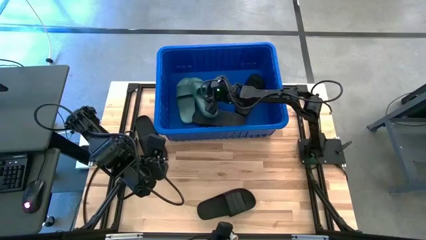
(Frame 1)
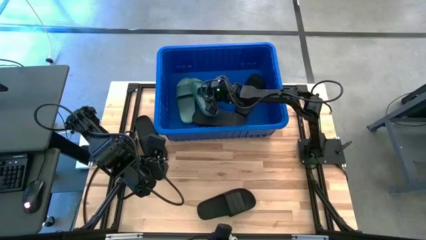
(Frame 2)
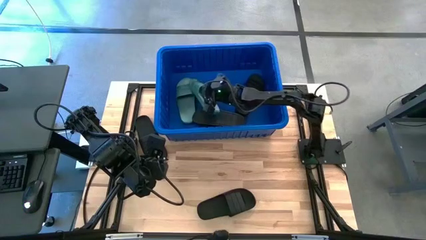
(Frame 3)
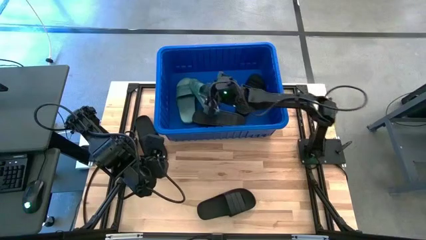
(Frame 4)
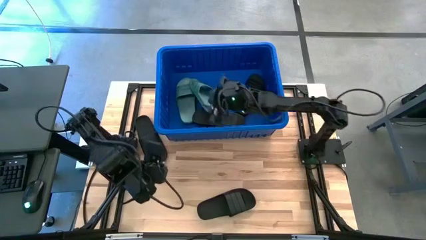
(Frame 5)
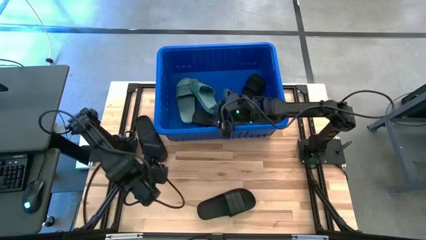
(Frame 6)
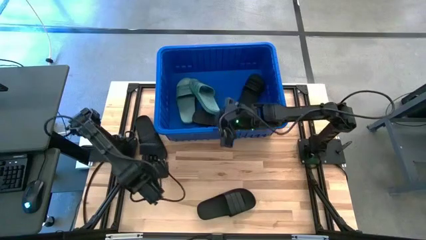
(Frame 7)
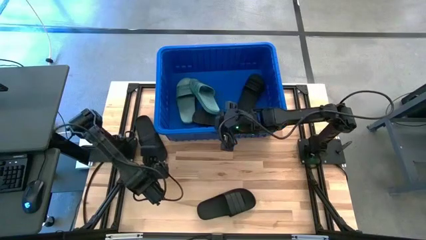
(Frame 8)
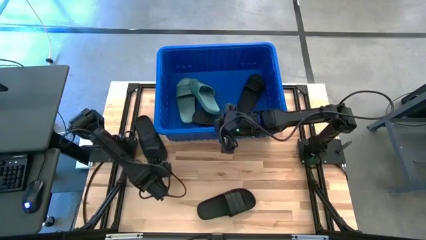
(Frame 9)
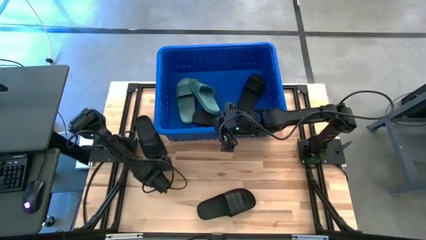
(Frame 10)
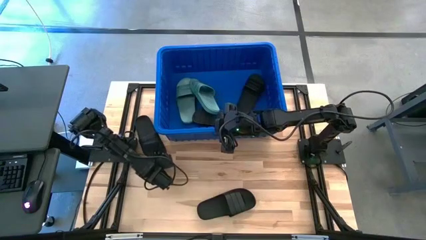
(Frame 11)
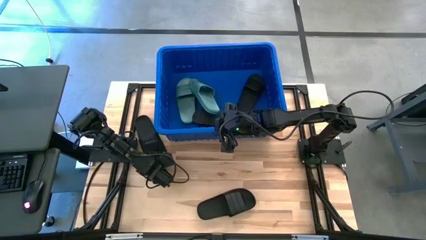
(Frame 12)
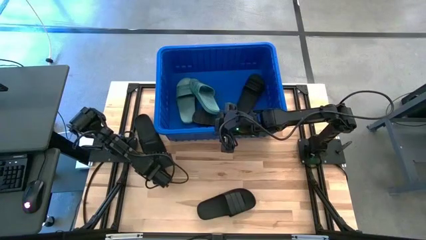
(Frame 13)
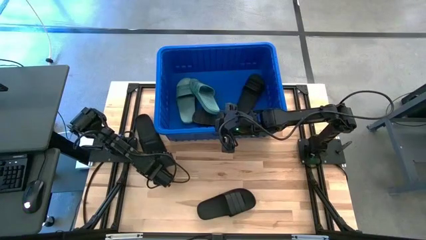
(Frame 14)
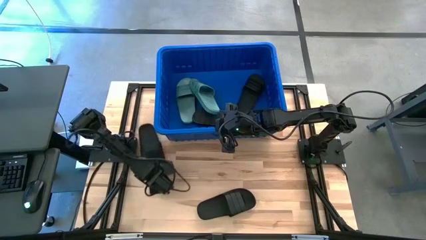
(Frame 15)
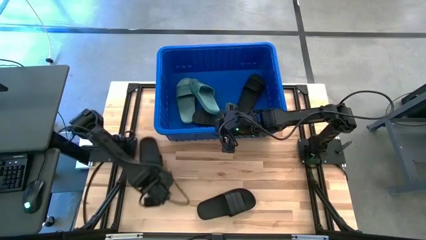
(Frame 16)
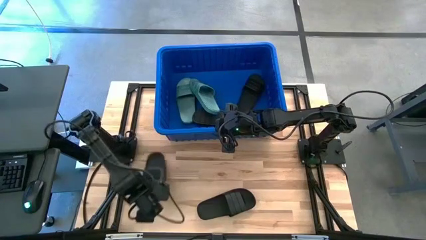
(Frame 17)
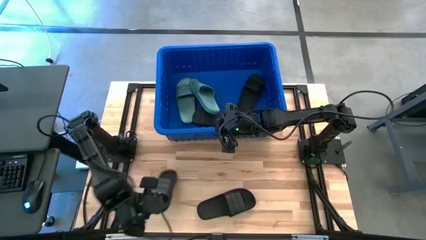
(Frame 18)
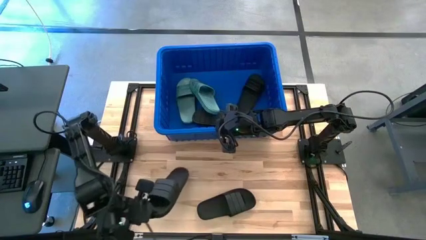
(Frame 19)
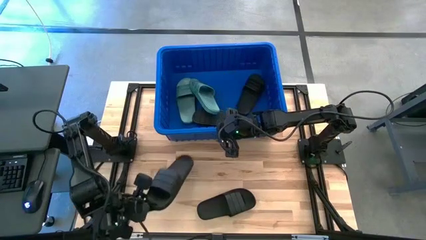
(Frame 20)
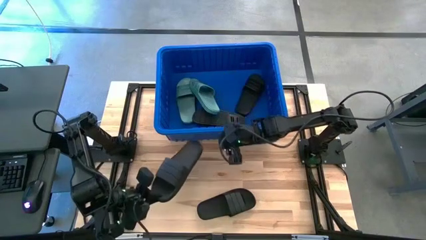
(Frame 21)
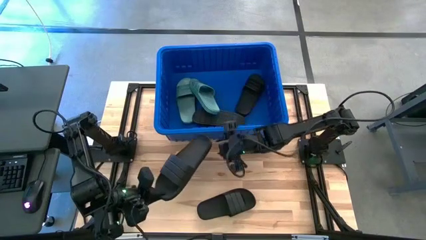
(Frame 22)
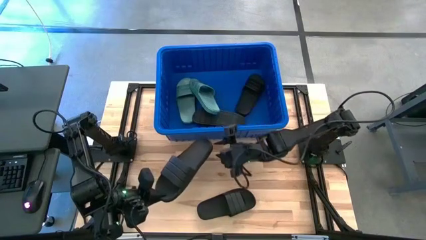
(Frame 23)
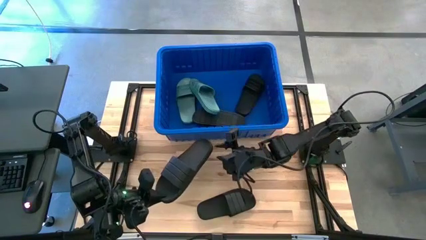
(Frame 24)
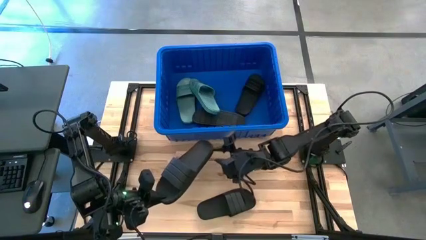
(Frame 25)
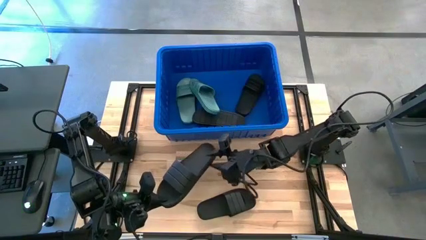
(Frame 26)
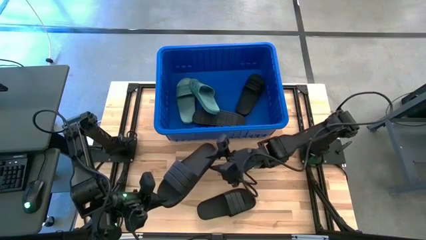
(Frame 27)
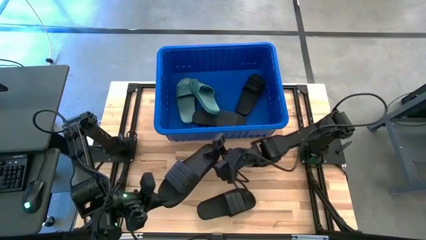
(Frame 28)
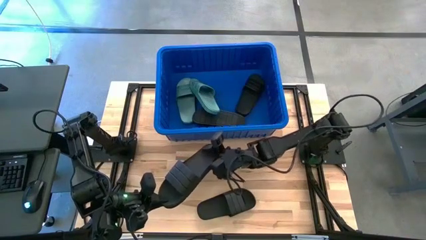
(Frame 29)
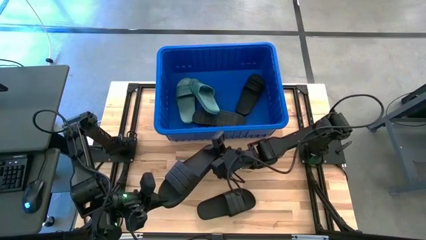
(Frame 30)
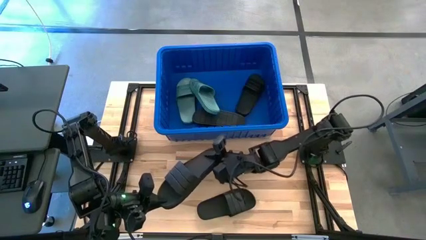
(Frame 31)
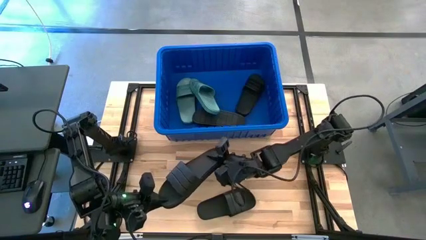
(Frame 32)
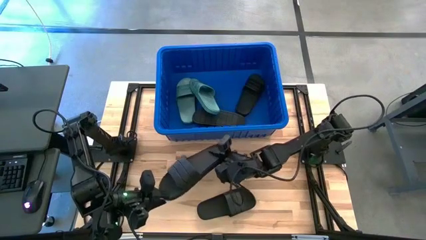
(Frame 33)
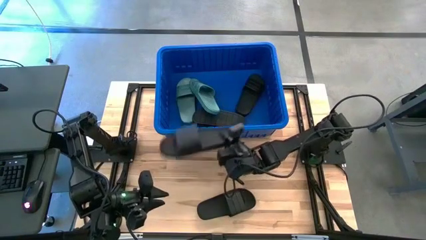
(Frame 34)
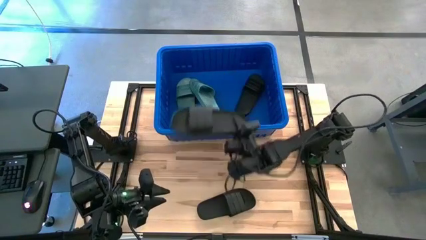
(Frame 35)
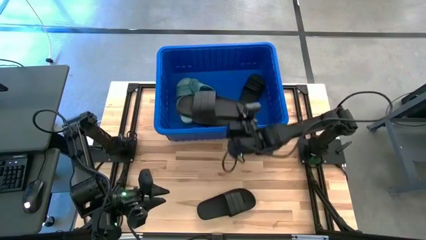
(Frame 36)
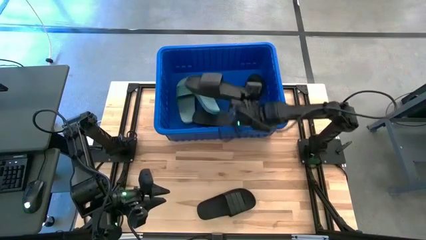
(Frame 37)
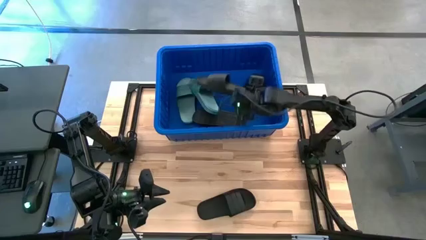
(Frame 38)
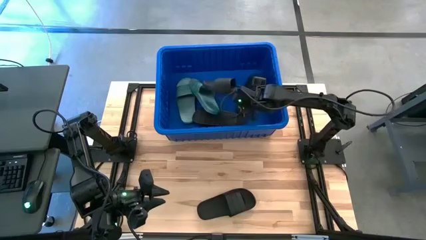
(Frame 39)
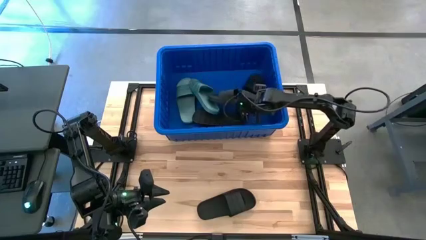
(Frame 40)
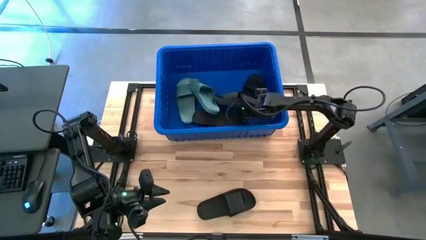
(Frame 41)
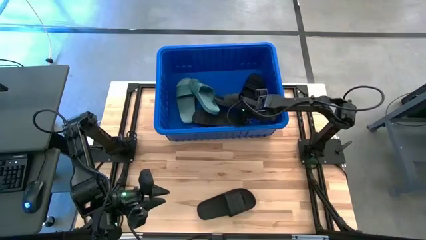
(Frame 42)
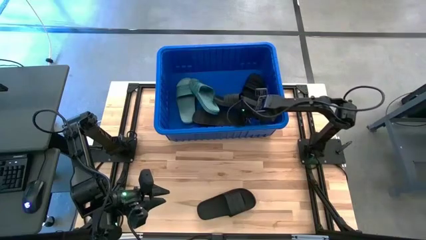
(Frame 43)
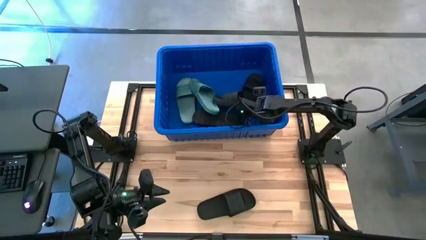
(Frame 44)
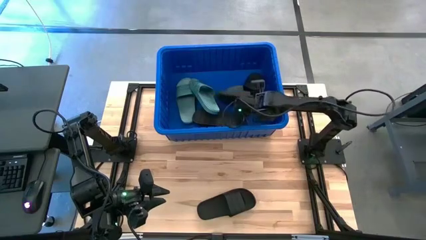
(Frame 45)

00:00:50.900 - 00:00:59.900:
Task: Pick and place slides into bin
Put the black slipper into the blue bin

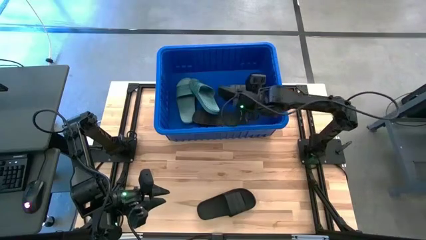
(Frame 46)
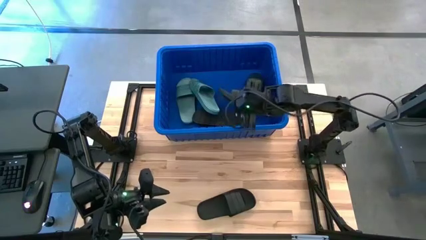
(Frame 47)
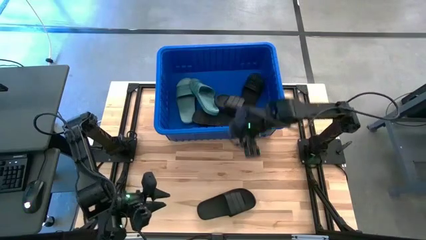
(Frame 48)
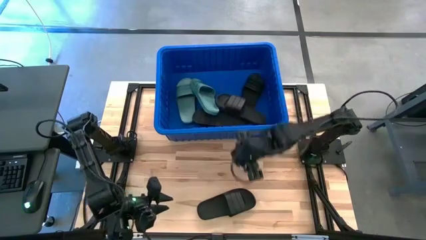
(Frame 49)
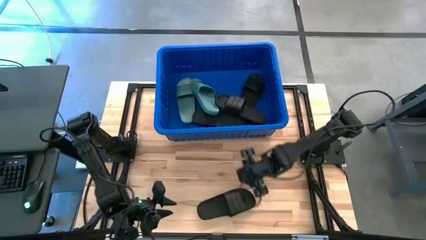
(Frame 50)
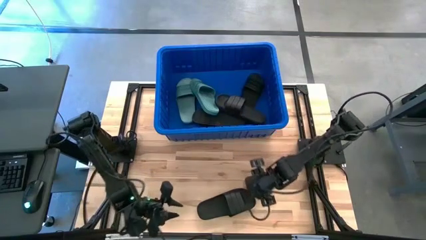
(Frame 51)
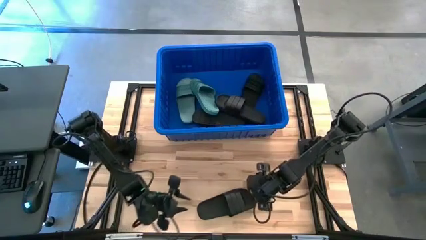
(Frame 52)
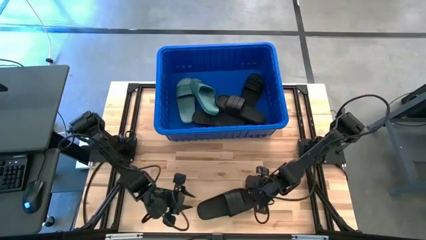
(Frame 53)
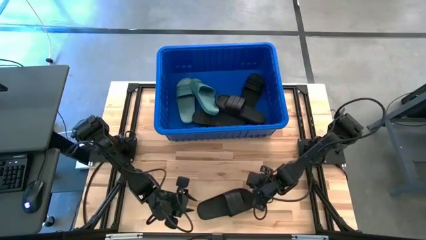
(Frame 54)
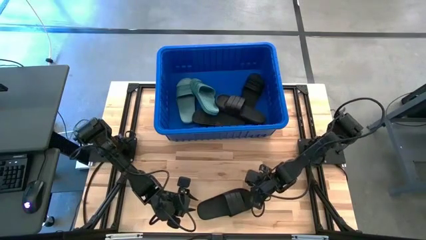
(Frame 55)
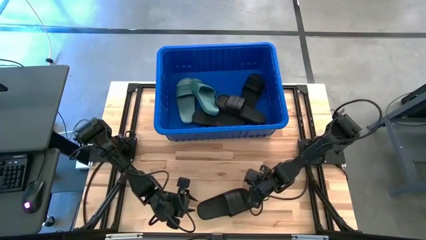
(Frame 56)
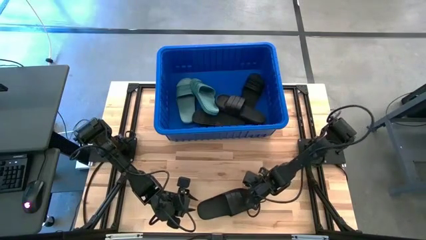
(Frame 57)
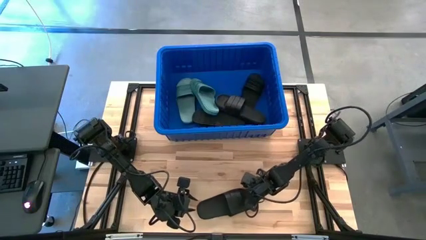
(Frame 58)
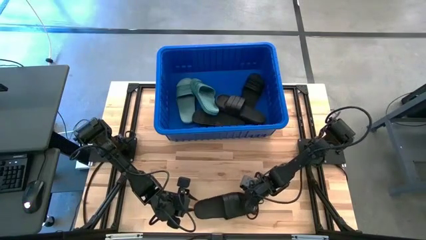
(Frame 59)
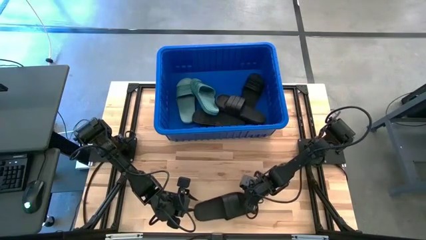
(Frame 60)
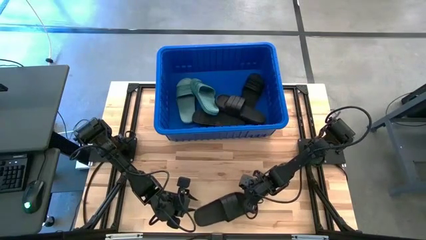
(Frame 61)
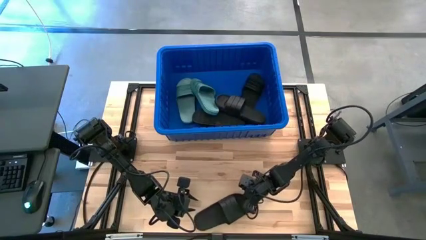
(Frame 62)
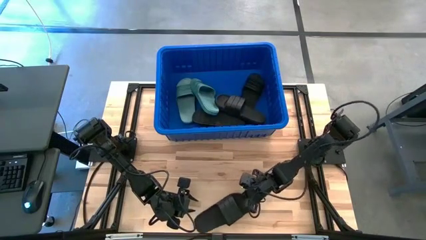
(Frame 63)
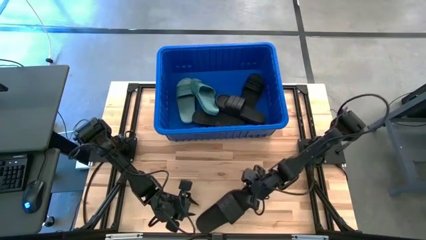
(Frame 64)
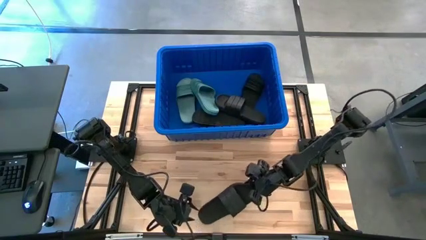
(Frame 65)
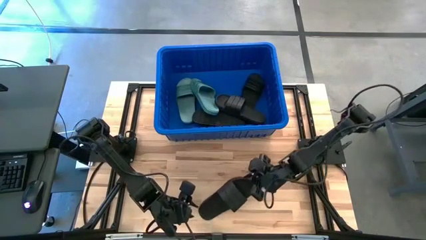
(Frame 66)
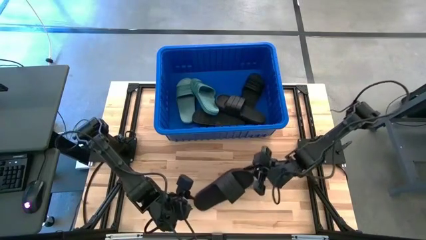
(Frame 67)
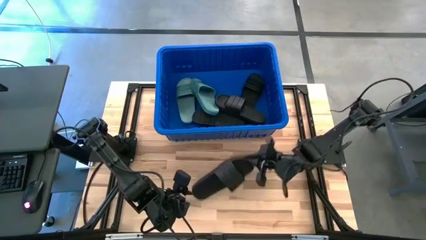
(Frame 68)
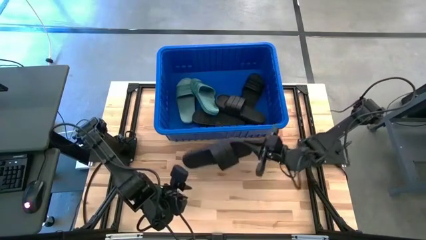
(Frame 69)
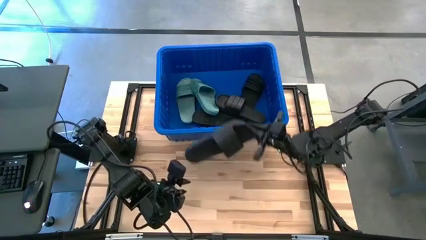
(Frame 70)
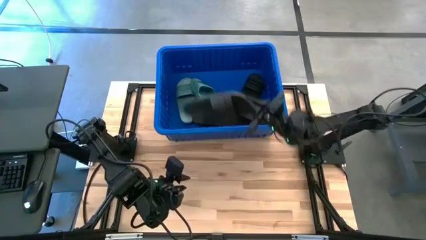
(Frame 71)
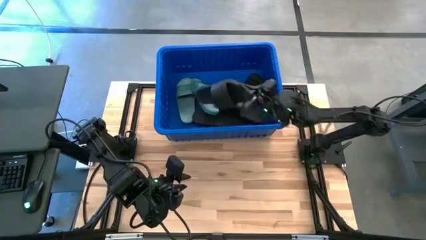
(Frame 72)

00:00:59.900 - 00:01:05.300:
Put the black slipper into the blue bin

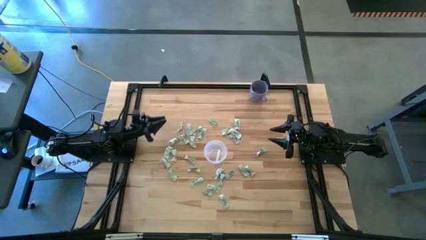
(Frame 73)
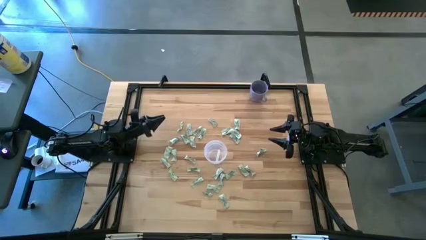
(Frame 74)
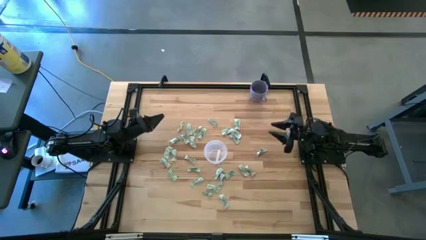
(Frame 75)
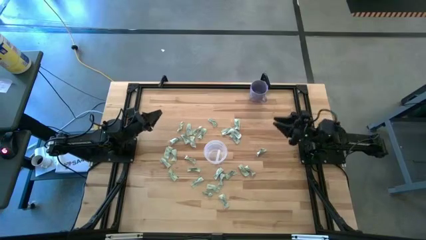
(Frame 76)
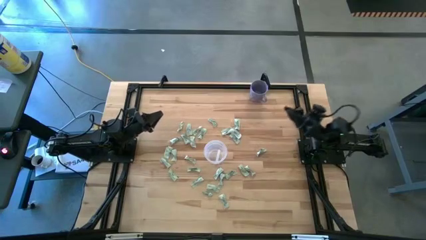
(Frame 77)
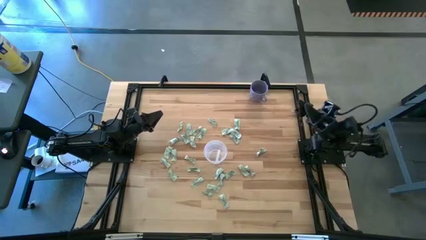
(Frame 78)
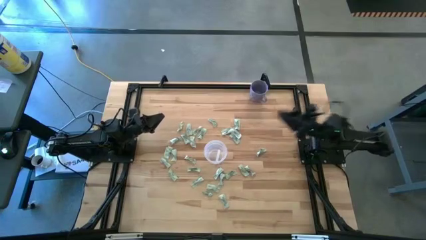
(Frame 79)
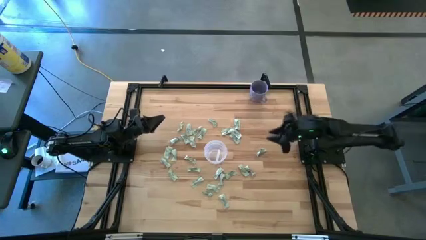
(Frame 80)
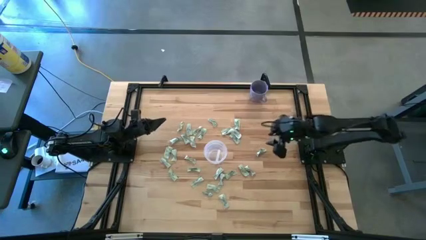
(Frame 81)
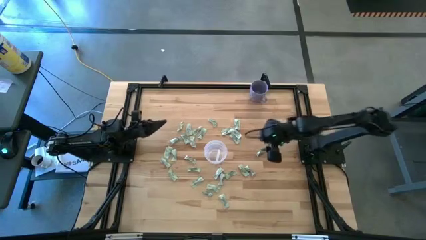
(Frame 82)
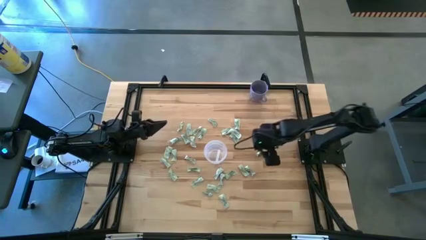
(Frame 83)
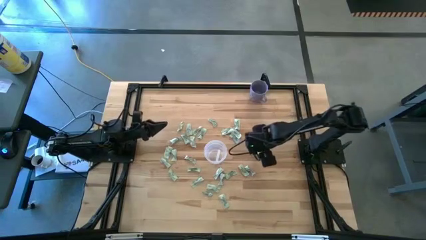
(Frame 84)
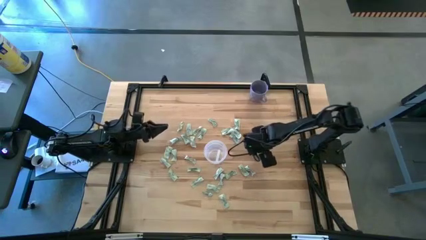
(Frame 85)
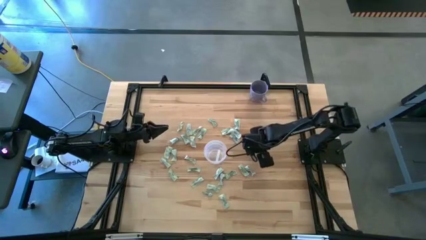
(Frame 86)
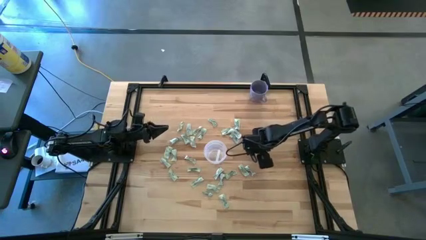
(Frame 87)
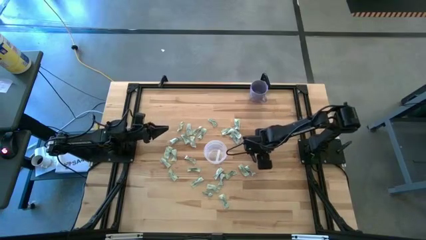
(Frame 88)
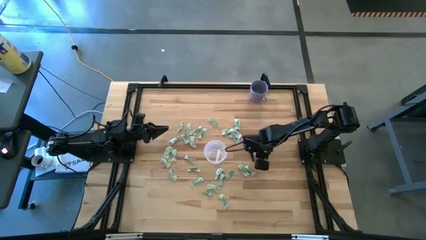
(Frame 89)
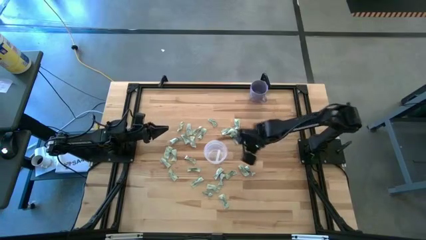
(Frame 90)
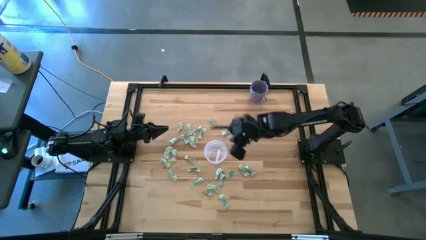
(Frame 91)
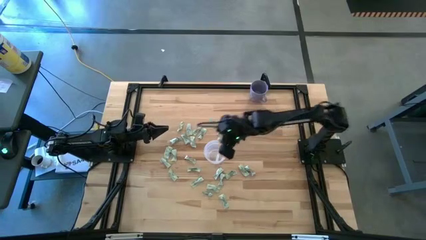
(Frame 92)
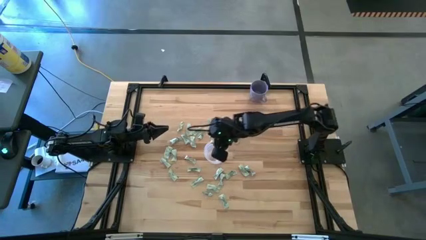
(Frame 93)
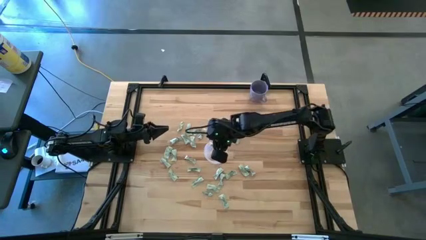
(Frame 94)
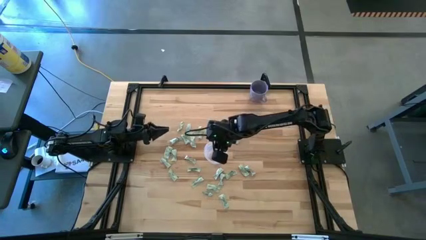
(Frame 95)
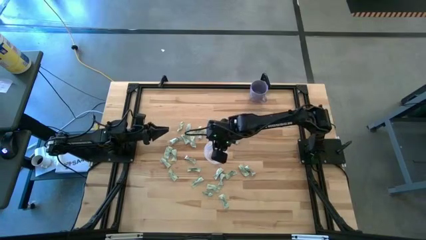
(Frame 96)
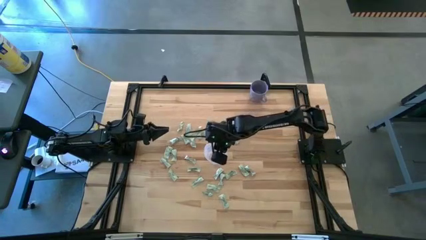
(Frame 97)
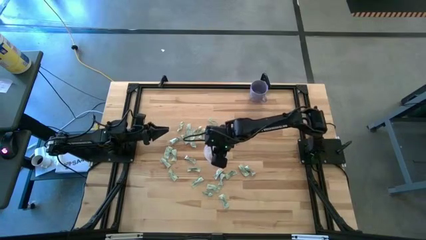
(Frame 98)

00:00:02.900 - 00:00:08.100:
Task: Pick and place Stevia / Truvia into bins
Put the green stevia packet into the transparent container
